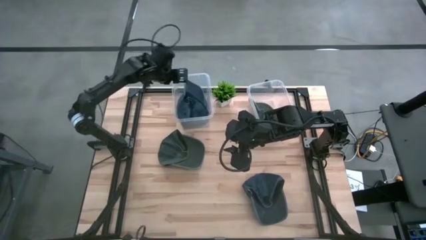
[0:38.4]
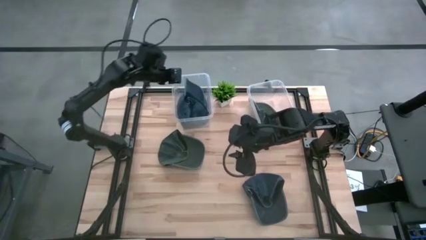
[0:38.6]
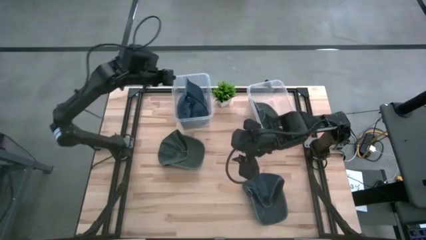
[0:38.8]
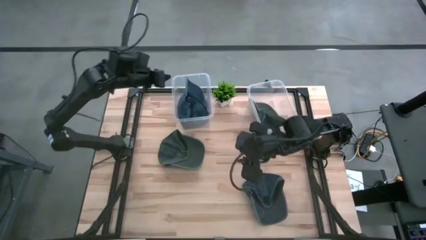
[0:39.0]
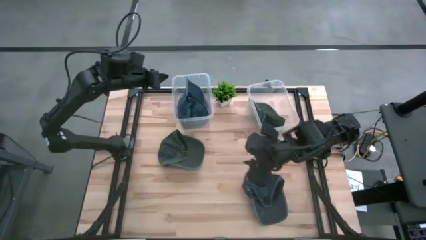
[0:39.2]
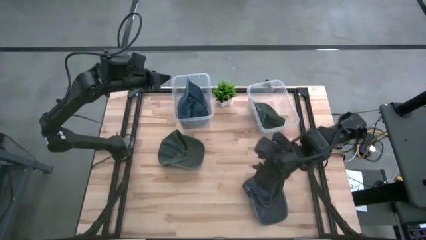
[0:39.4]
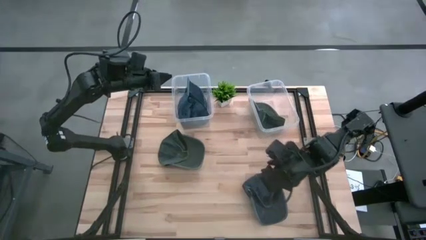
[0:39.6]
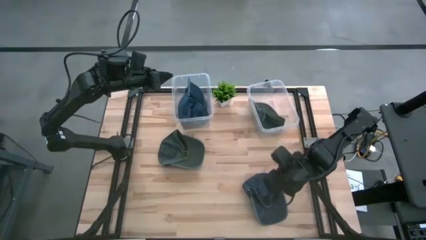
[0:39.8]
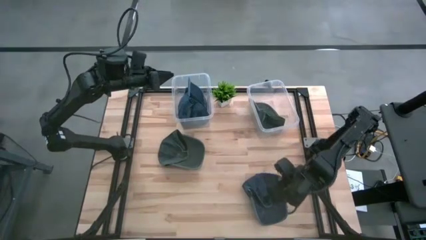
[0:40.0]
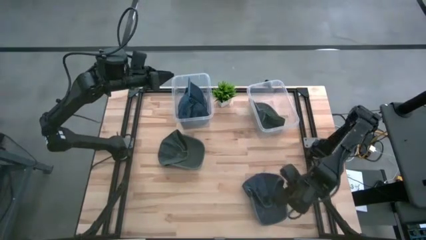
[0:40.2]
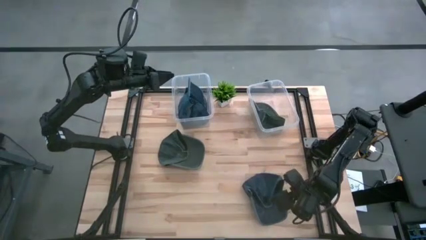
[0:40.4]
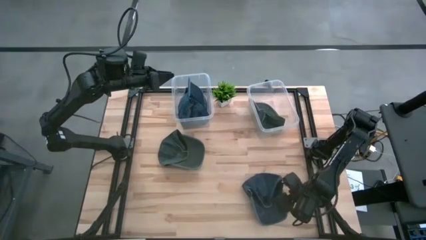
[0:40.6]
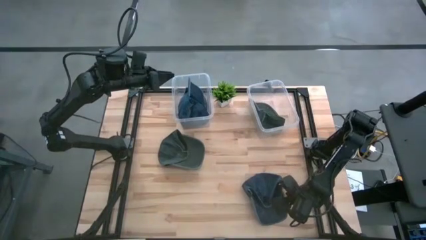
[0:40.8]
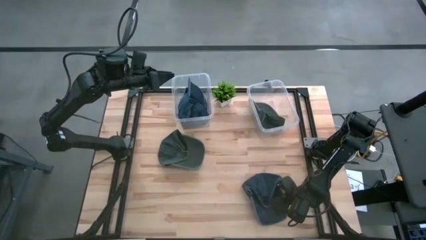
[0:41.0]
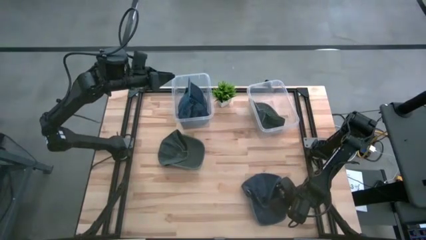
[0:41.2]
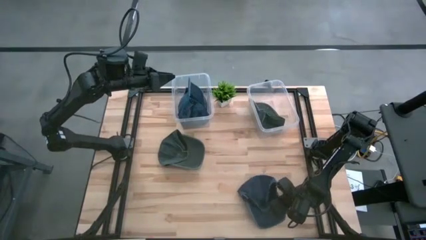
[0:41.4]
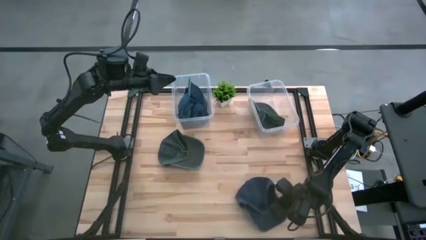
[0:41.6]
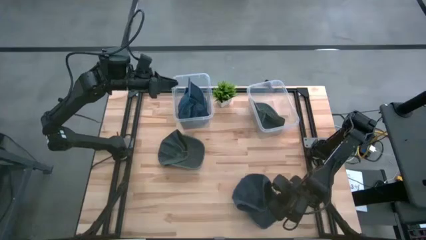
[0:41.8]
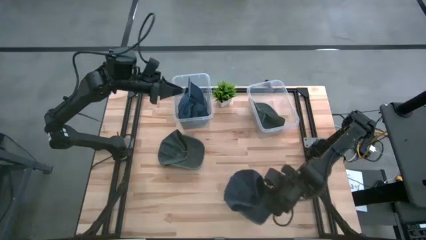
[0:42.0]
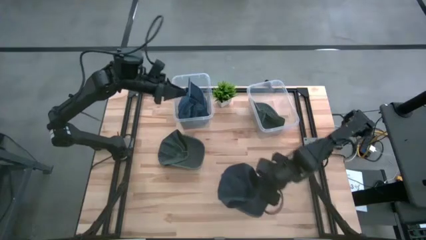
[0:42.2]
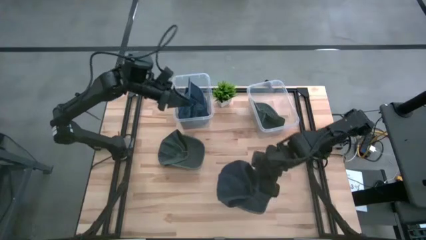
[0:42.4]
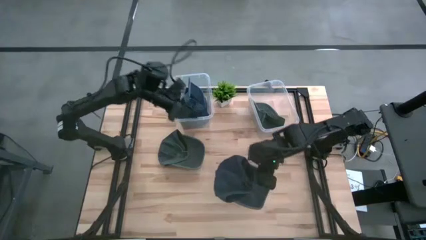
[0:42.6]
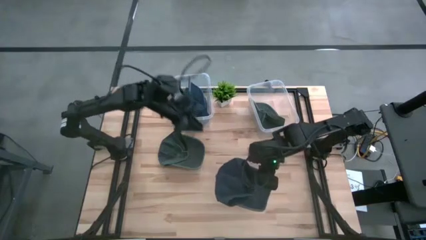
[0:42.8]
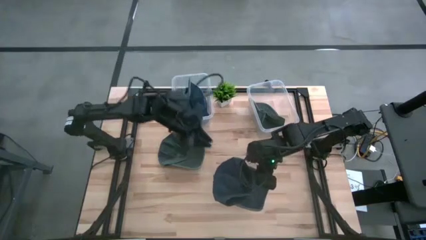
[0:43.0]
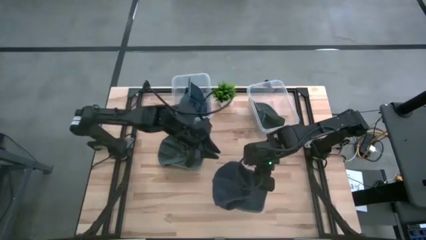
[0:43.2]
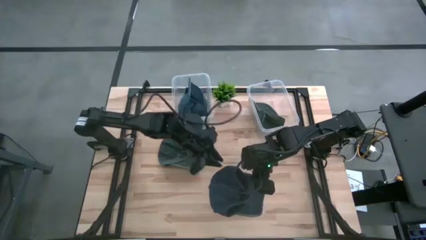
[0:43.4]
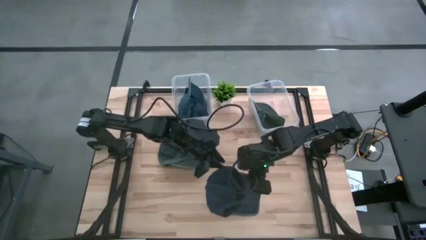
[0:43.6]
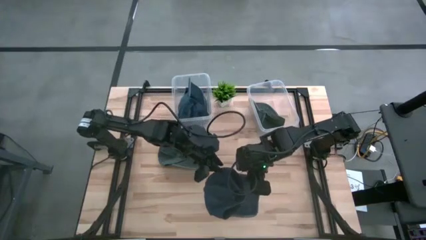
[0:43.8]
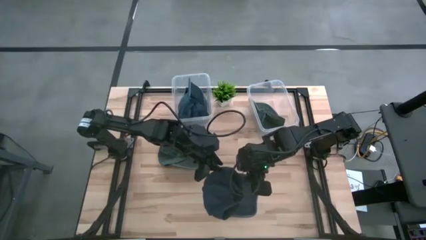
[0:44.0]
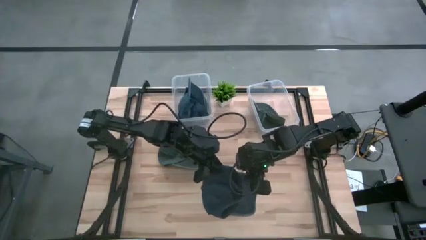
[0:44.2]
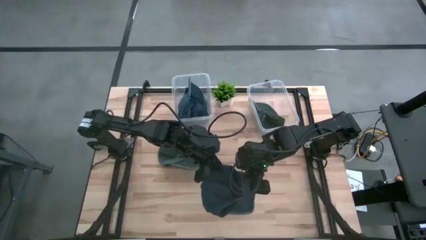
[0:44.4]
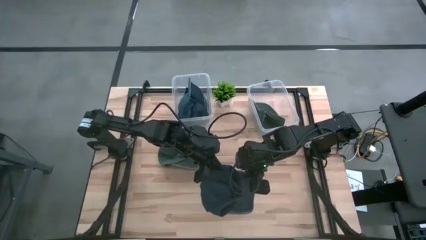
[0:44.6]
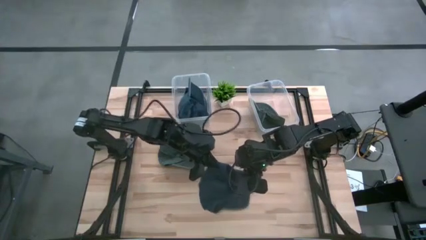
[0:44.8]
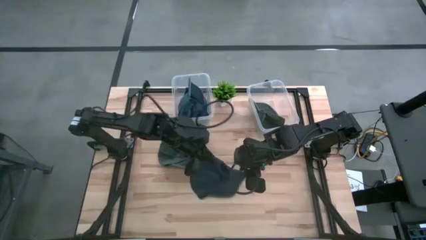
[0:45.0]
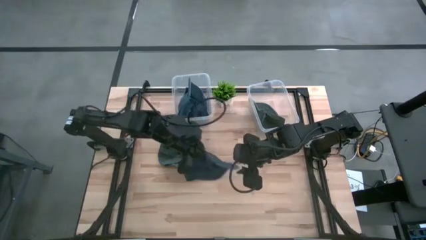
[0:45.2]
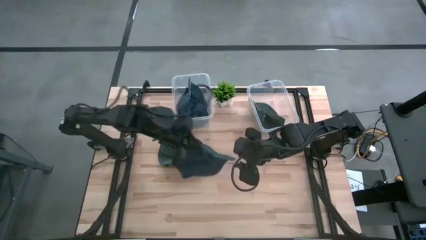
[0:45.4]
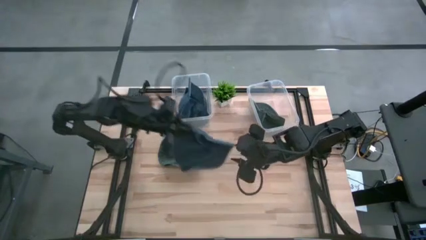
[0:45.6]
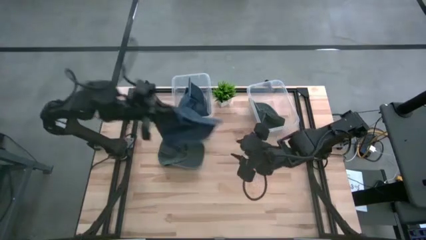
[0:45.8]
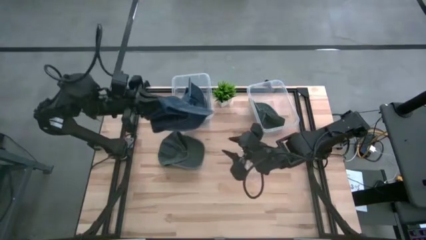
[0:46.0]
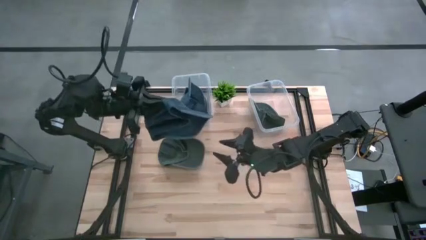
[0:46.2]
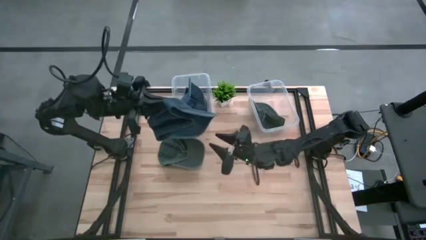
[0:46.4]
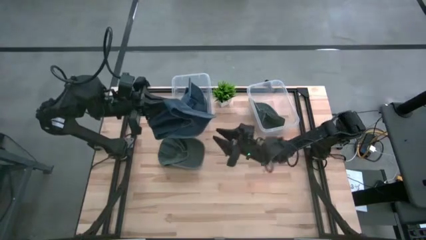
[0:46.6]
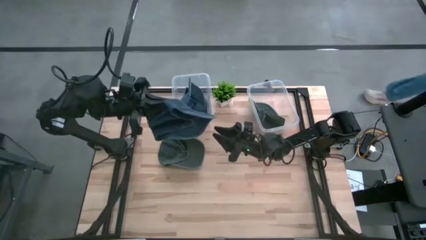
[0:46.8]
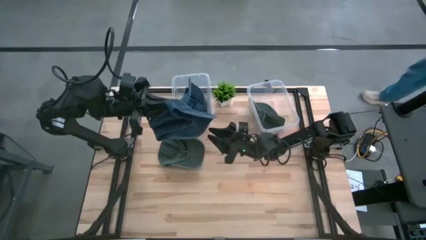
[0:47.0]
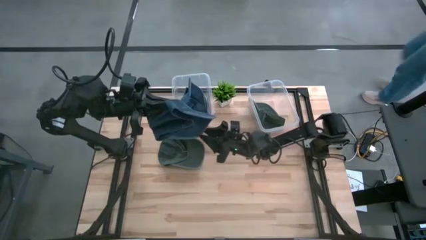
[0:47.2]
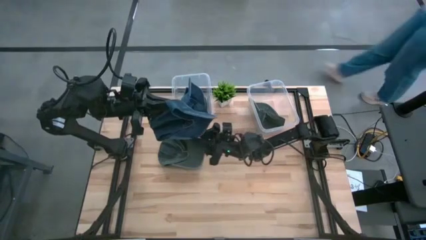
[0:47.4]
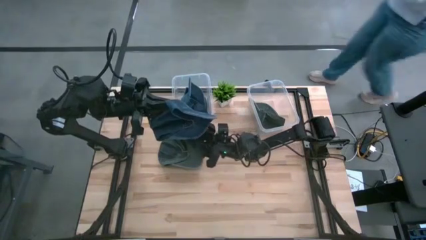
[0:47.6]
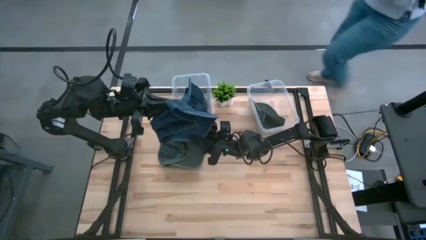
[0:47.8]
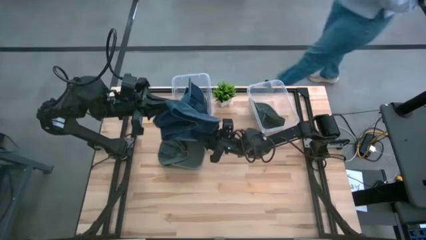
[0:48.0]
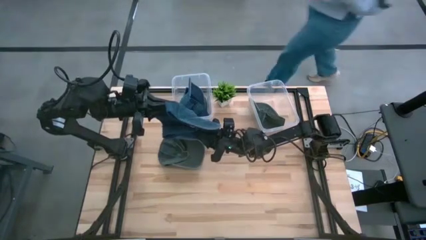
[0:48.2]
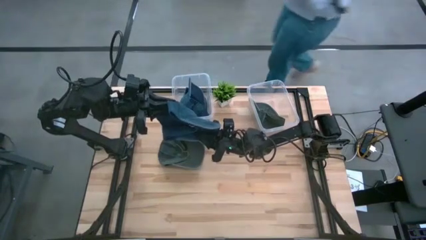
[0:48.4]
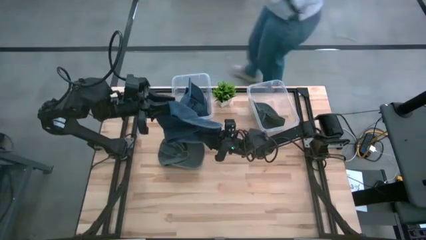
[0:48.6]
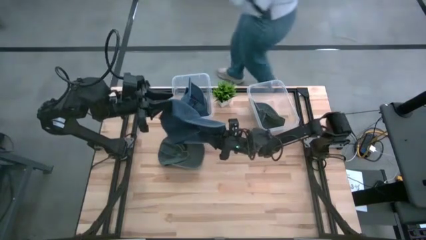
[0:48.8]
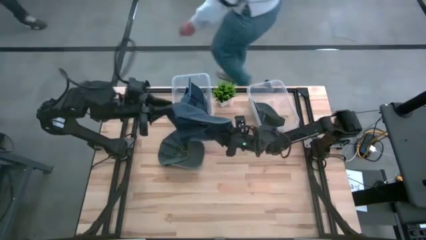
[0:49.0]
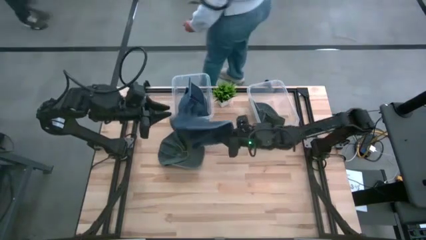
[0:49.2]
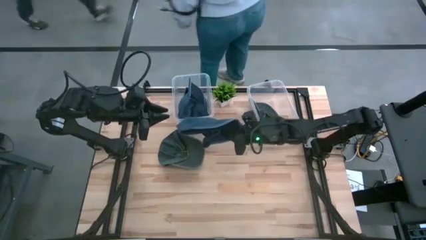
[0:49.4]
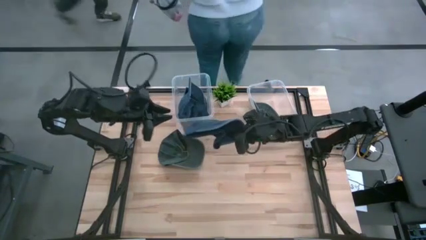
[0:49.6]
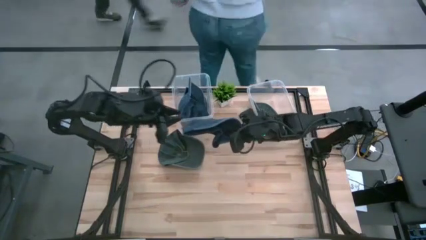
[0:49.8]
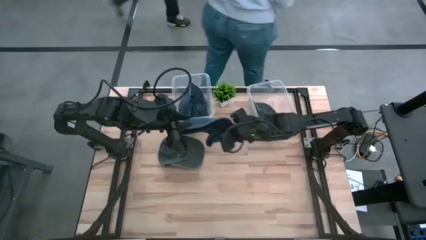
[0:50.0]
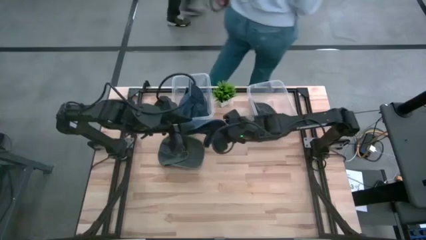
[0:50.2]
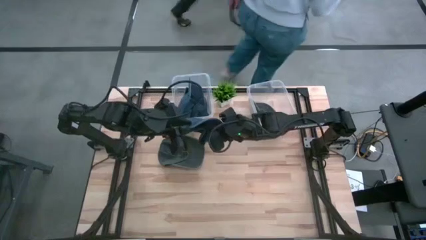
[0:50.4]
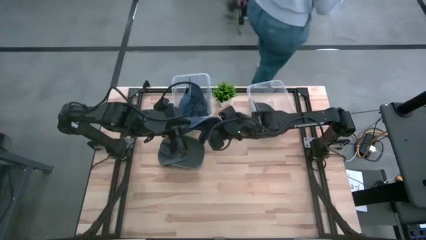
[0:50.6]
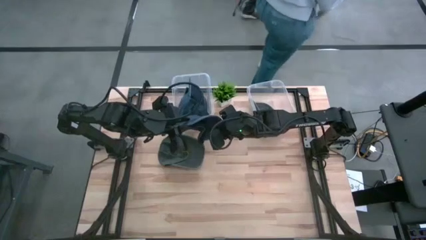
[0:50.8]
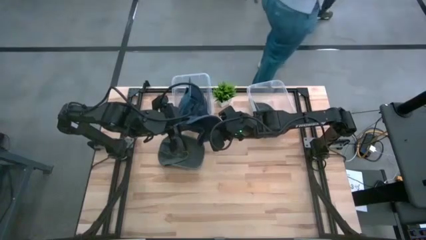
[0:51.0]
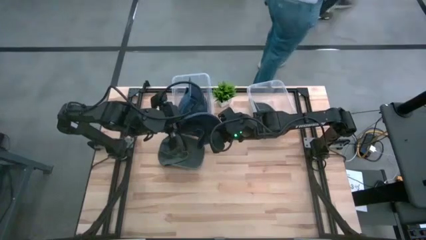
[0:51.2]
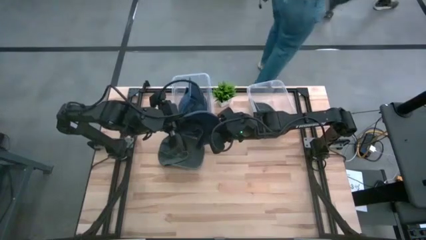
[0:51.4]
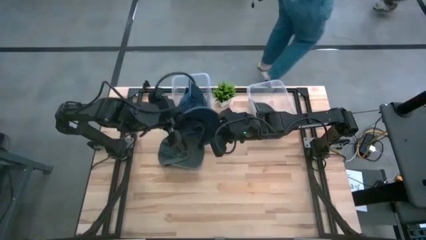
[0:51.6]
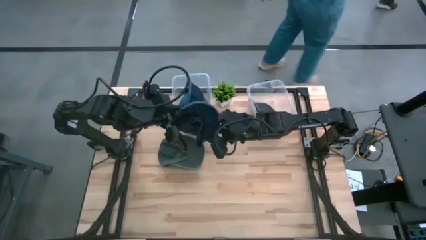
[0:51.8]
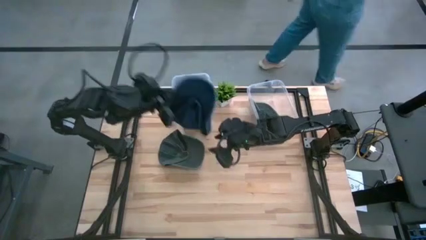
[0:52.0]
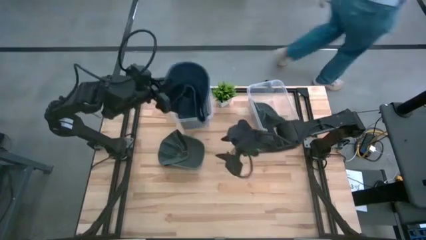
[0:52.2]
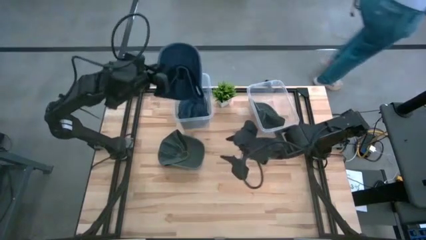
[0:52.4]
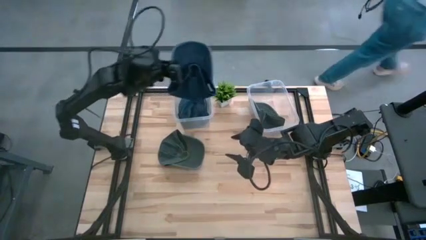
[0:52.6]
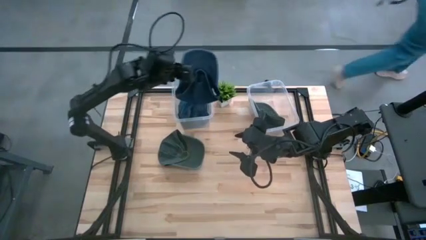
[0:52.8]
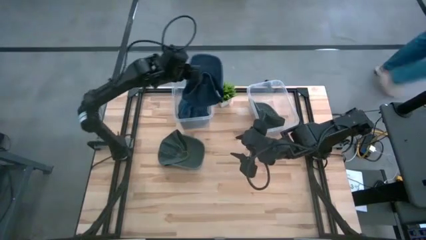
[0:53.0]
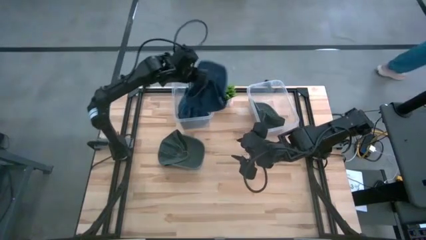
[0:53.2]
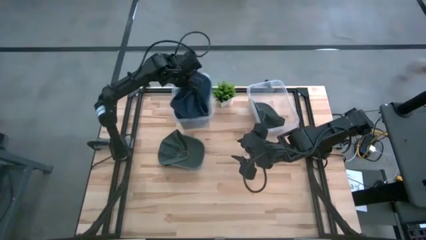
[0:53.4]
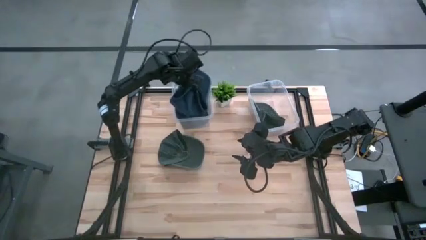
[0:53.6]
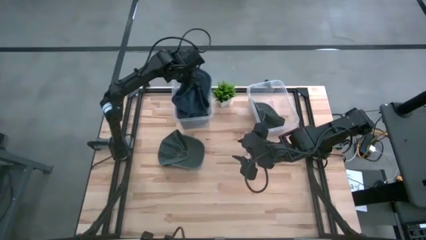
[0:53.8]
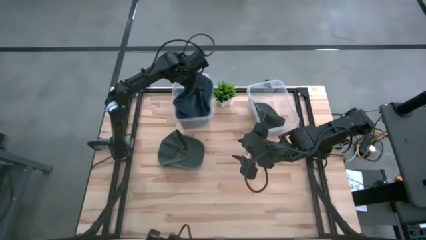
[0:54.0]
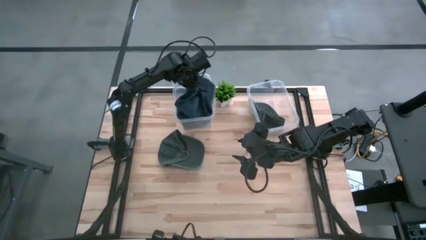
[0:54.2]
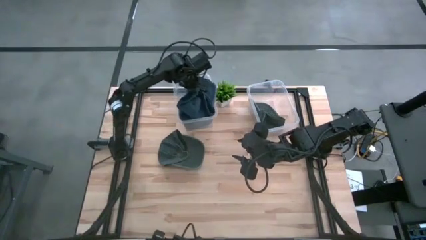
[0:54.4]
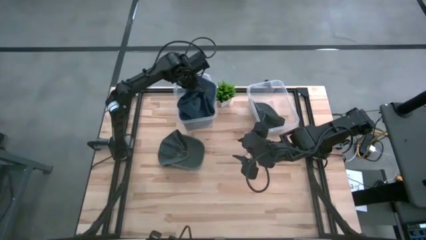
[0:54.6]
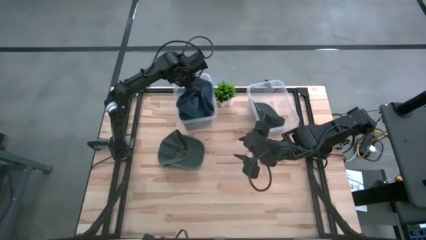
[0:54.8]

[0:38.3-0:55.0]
Task: Pick & Place hat
Put the blue cap into the left transparent bin

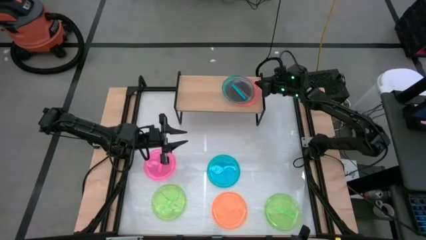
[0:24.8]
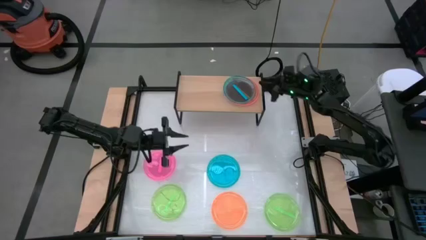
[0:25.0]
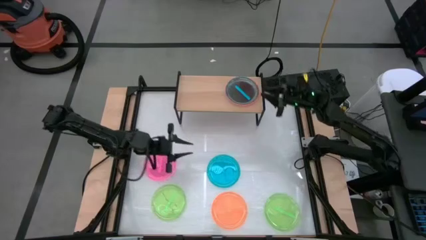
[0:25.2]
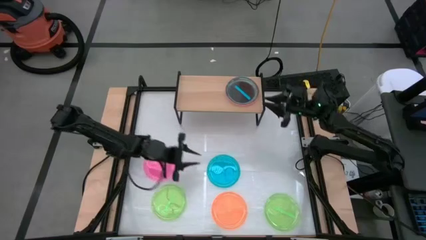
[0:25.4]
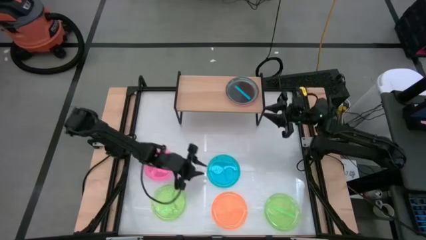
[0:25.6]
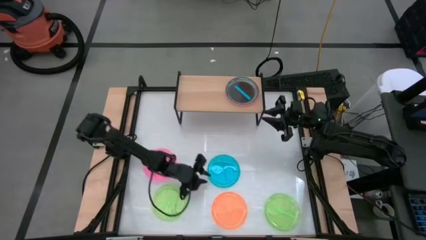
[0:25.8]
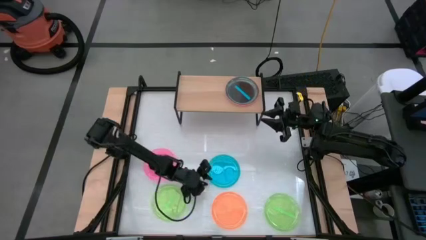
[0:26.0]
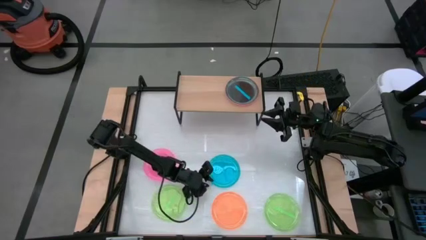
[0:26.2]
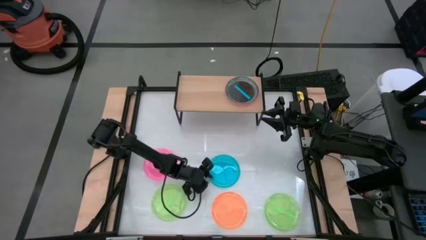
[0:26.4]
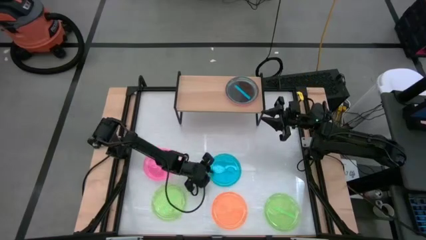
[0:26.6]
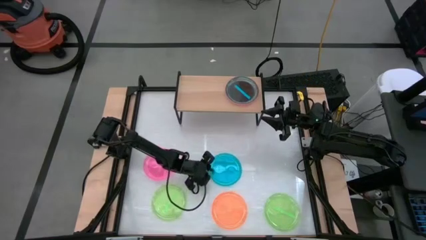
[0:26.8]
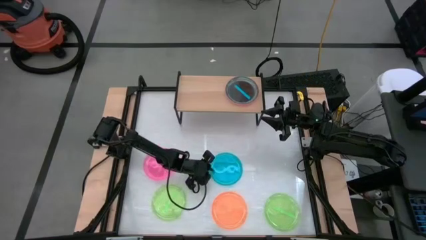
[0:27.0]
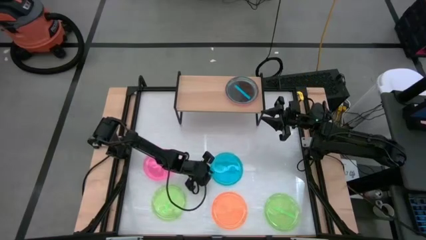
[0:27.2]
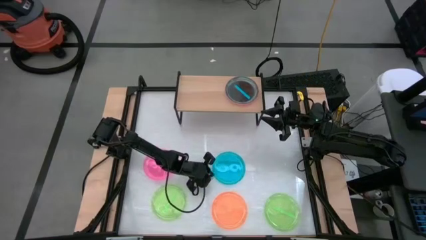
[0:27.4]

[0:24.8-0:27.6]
Task: Place and stack plates onto a shelf
Stack the blue plate on top of the blue plate on the shelf
